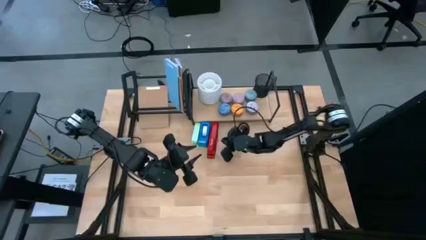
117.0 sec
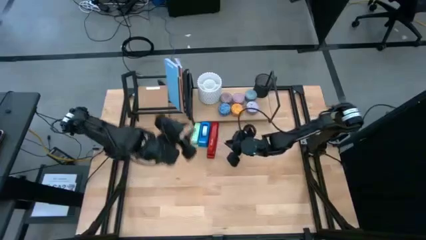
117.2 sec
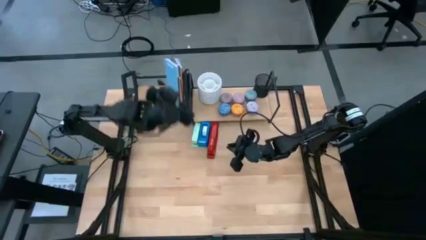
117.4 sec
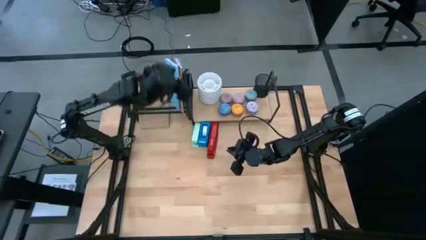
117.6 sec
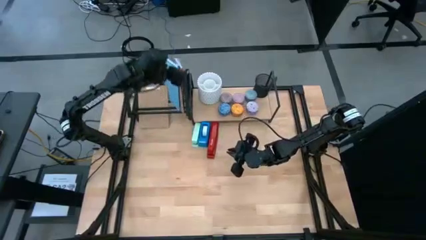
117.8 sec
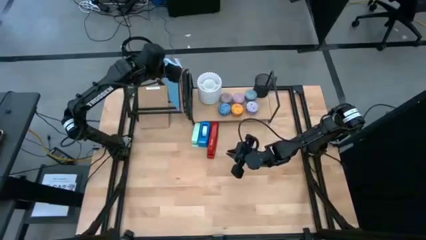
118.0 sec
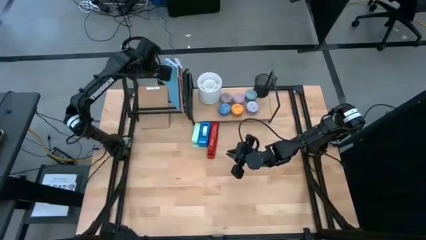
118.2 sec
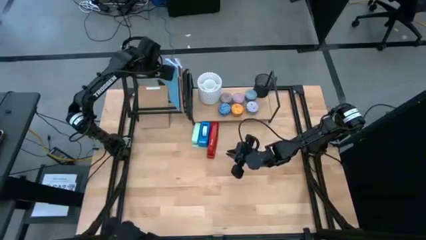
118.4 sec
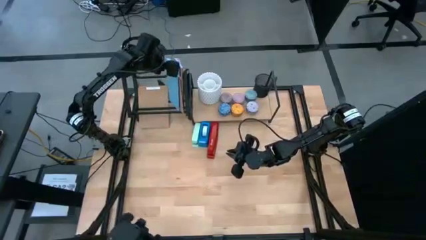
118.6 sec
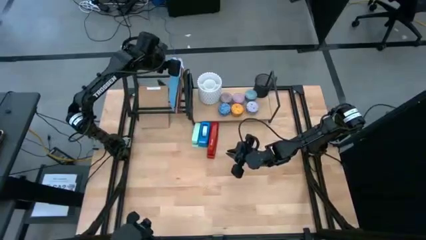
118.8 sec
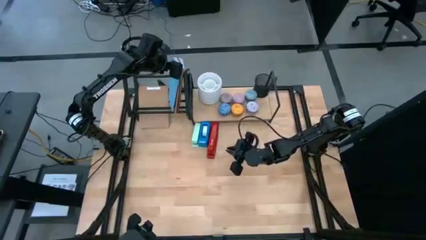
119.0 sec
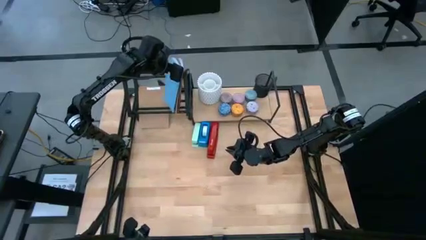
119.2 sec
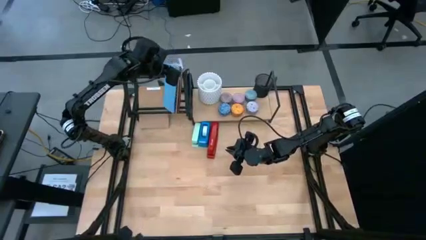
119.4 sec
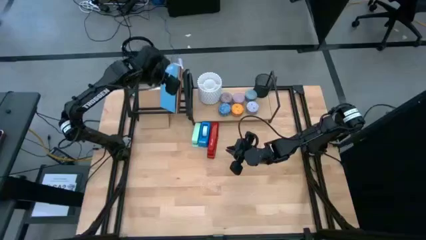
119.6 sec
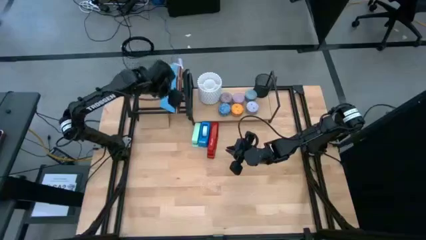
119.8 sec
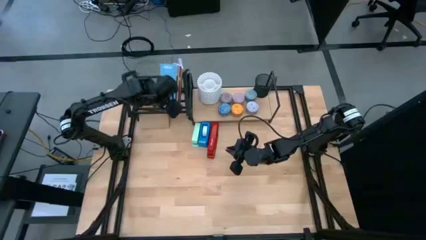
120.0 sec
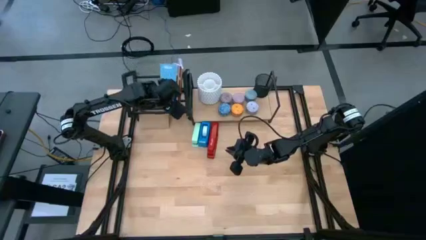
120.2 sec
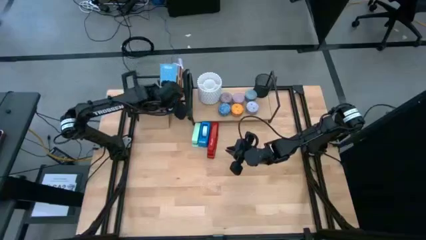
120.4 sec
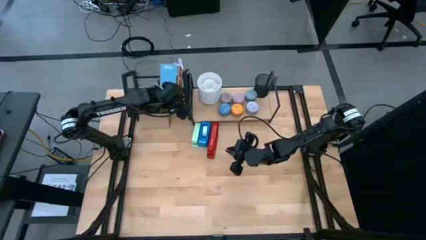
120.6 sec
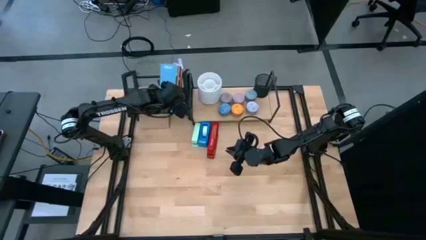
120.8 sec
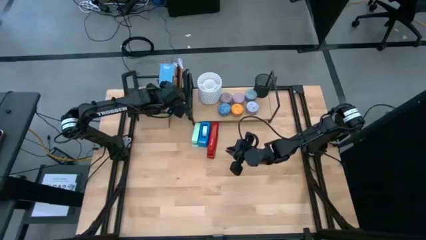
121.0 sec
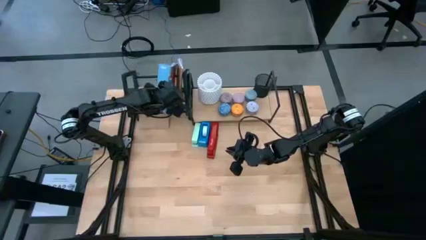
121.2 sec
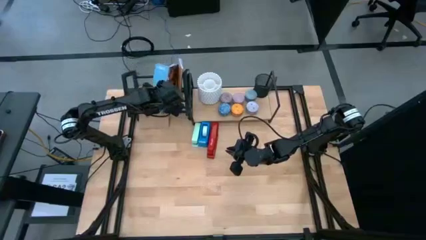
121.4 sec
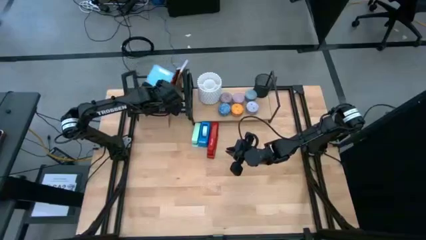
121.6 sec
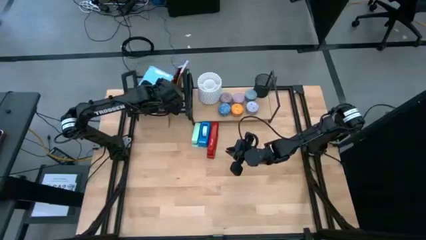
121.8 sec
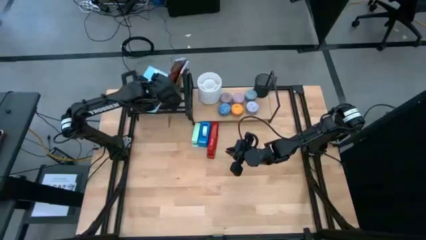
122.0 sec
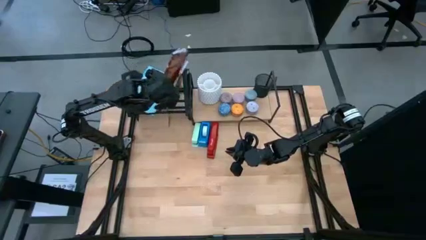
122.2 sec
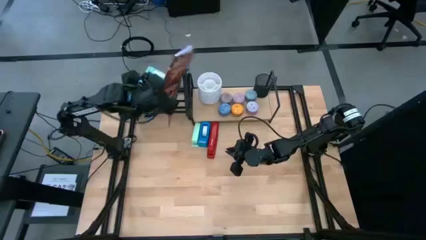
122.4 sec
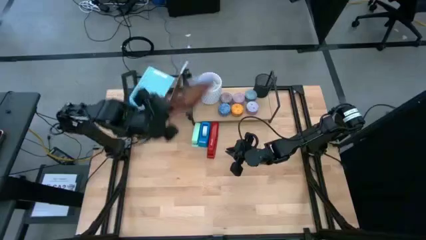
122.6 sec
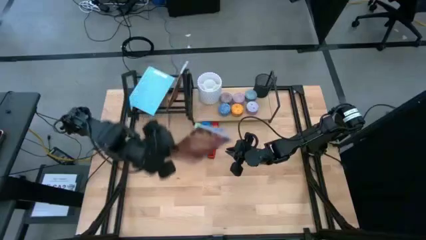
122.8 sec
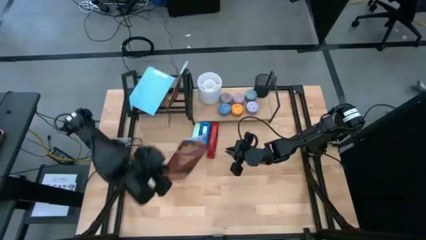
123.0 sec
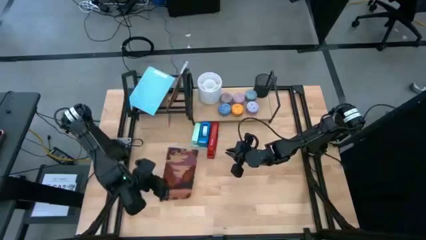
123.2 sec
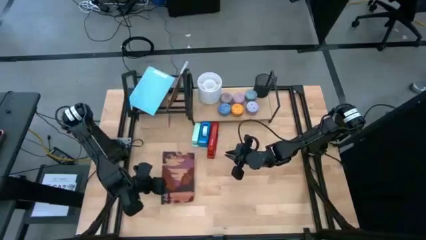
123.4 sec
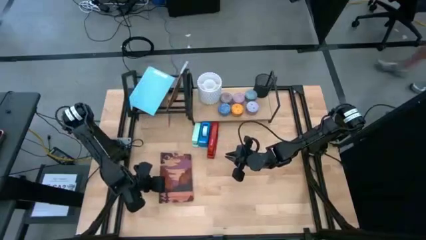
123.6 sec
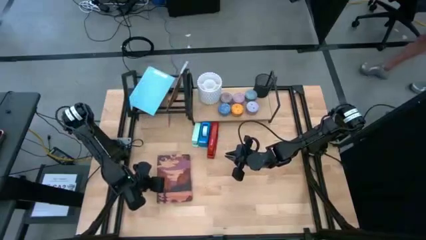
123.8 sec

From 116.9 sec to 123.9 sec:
Task: Stock shelves
Remove the brown book from the bookshelf

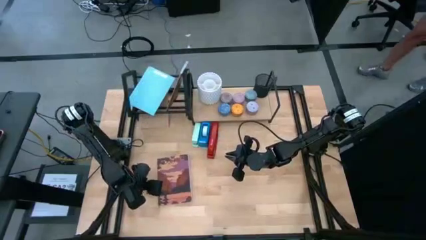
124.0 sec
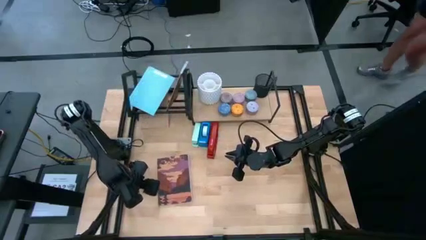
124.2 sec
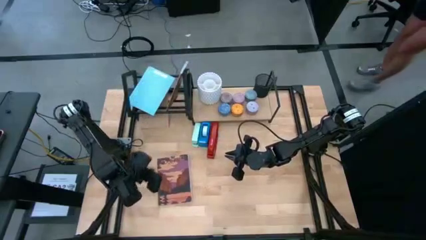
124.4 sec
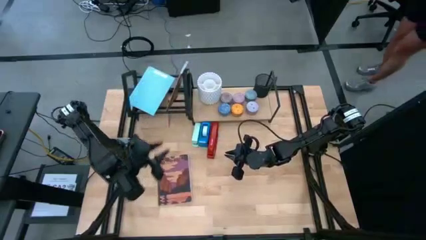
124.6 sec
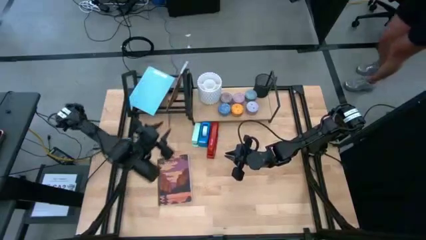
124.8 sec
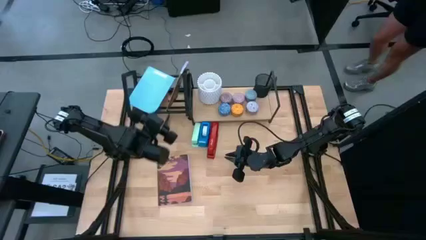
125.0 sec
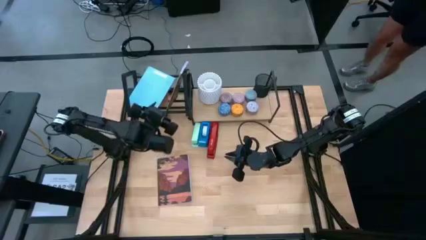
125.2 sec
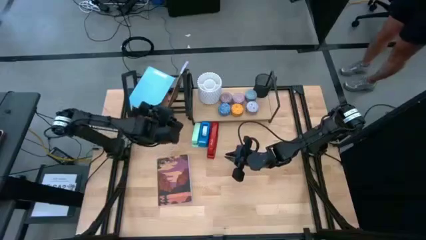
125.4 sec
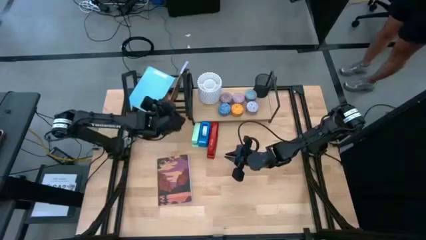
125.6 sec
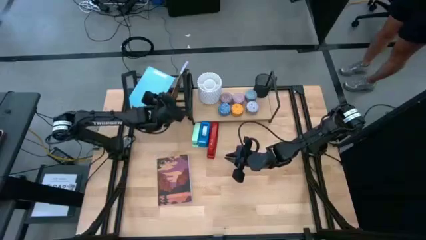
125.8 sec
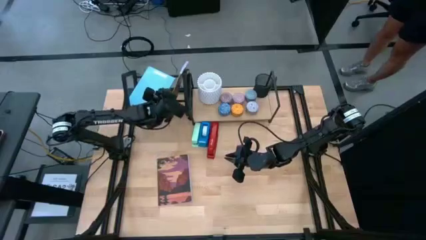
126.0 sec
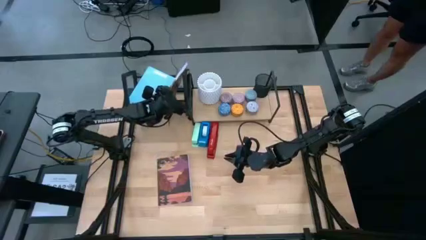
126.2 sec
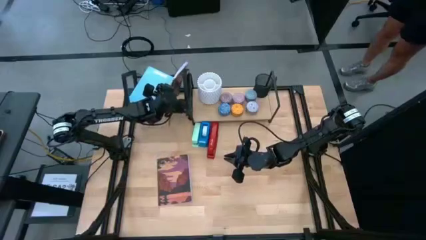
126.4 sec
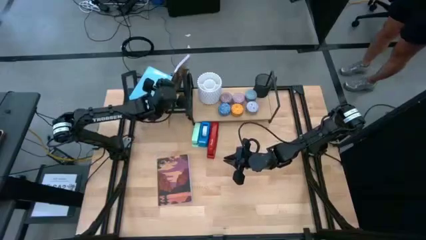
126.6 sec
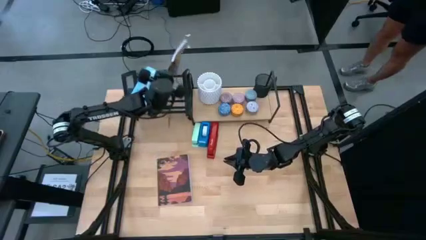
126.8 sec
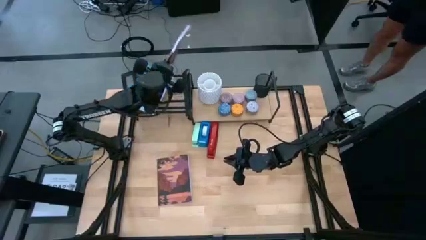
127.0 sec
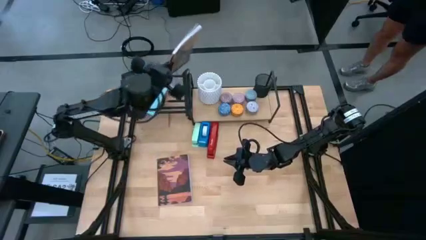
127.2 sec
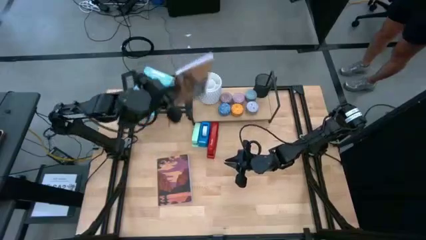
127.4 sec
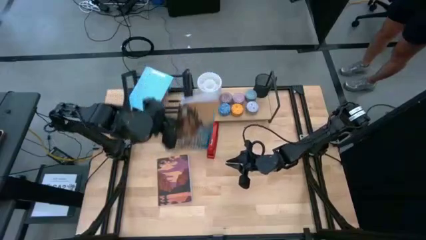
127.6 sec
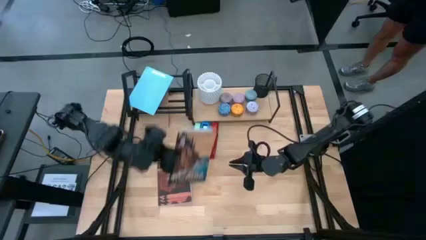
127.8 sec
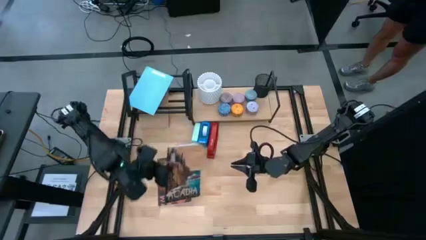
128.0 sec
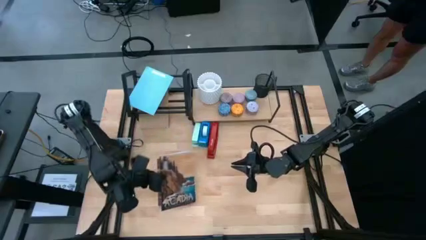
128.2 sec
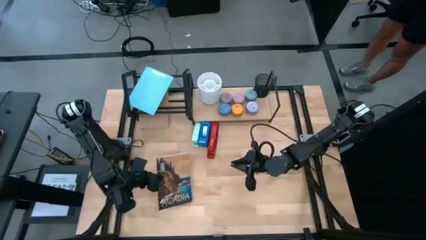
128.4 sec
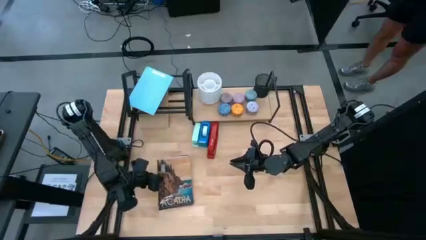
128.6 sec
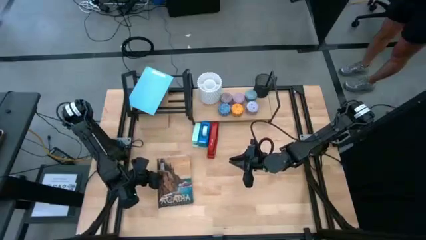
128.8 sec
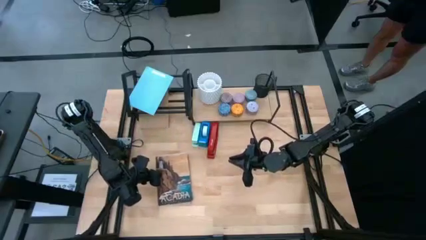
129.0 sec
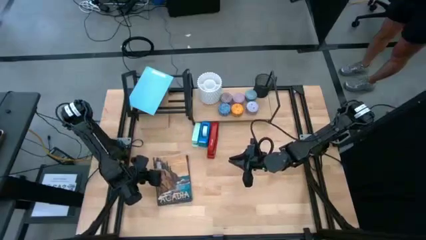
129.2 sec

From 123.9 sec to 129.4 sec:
Remove the brown book from the bookshelf

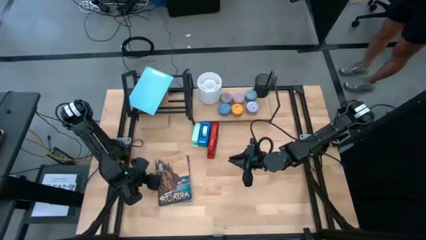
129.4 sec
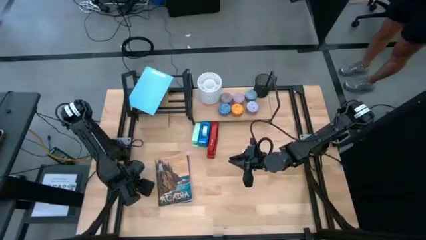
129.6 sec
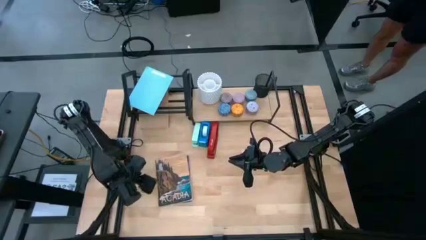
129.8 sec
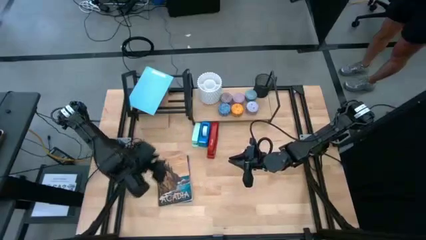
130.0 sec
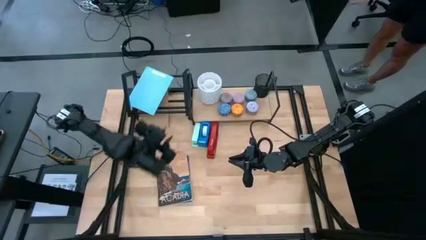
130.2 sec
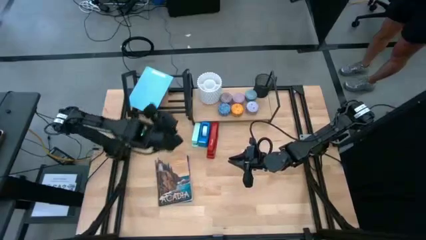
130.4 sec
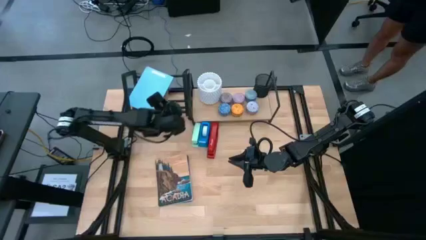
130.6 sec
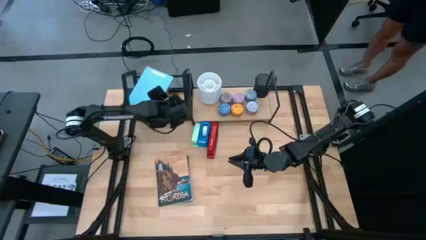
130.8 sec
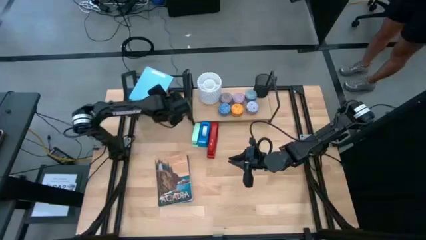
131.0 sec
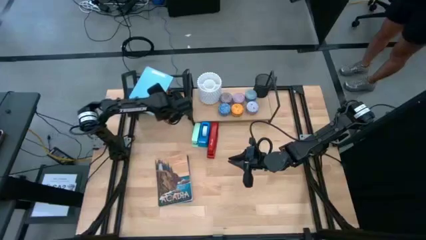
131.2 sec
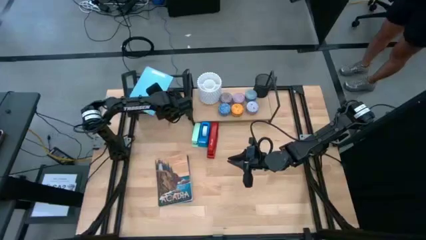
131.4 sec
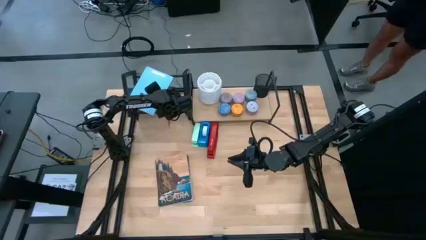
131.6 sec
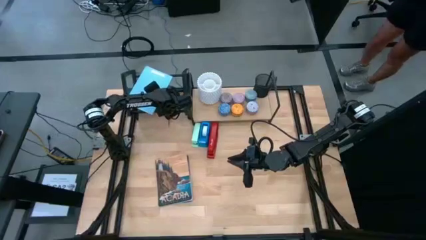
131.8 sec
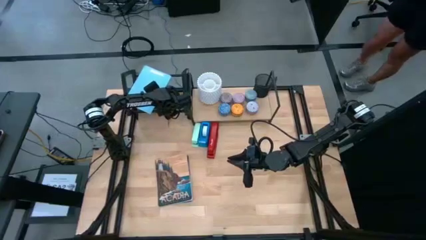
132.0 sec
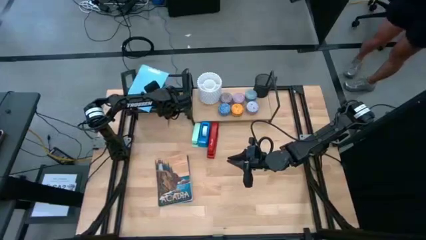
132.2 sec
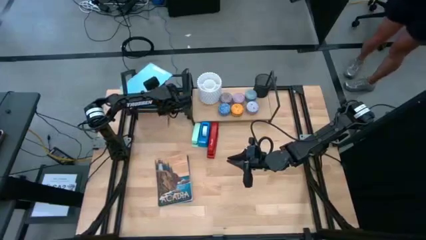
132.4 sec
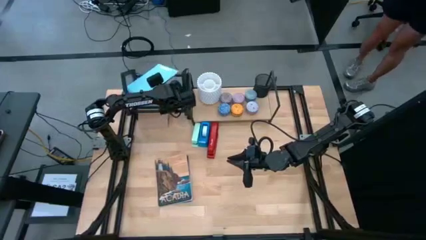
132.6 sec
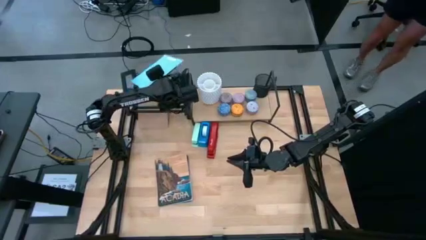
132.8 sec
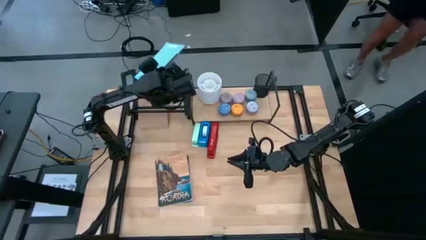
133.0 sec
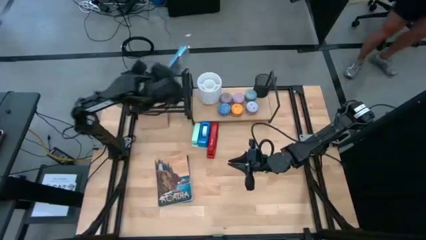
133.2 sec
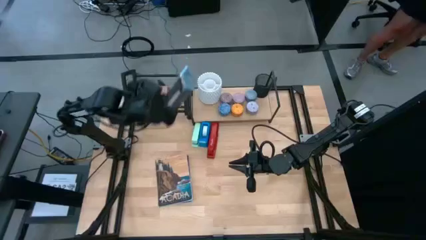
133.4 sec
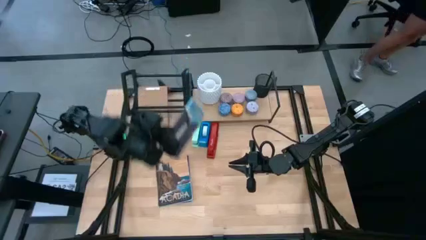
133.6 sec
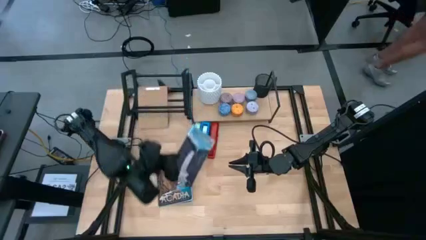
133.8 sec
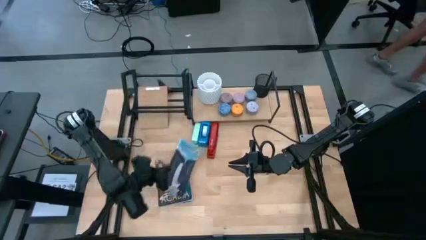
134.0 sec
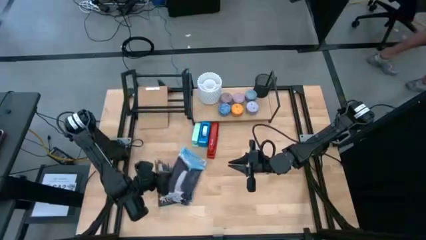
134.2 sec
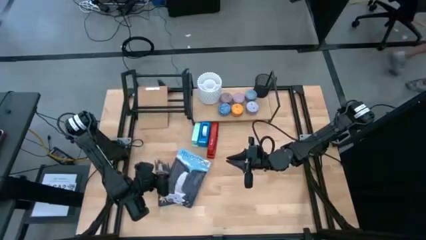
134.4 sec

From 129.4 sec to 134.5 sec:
Remove the blue book from the bookshelf
